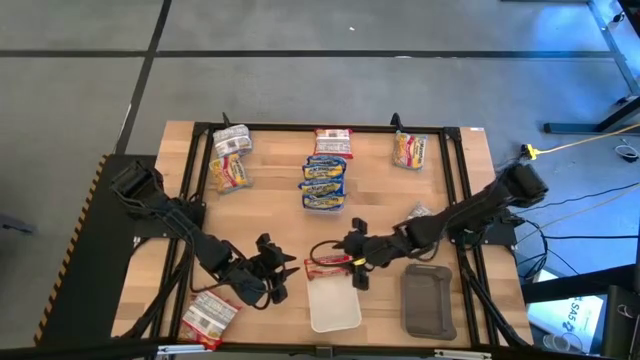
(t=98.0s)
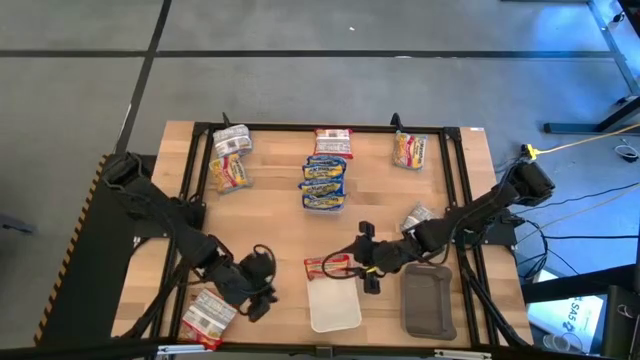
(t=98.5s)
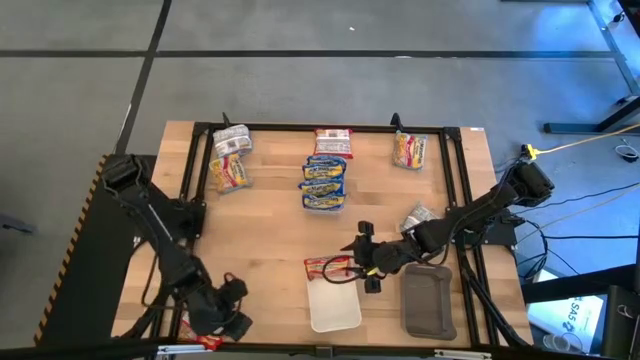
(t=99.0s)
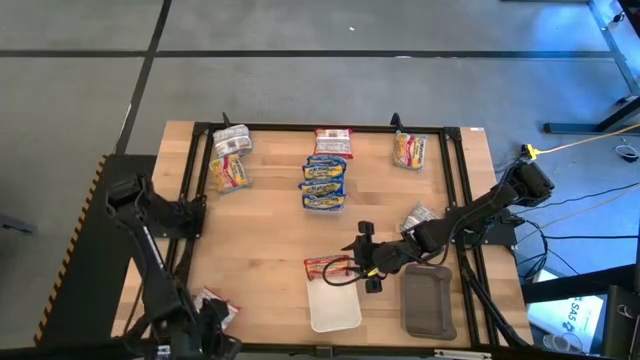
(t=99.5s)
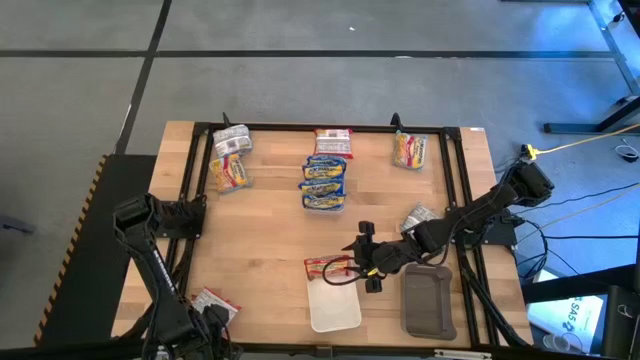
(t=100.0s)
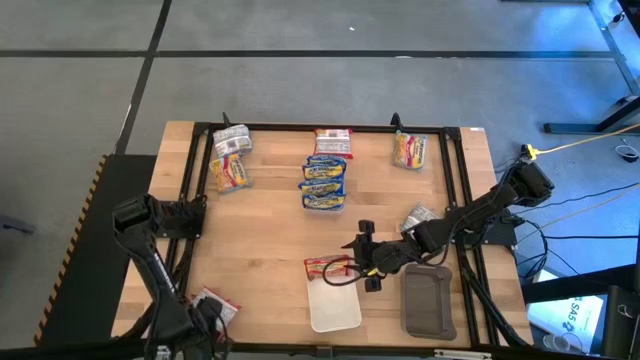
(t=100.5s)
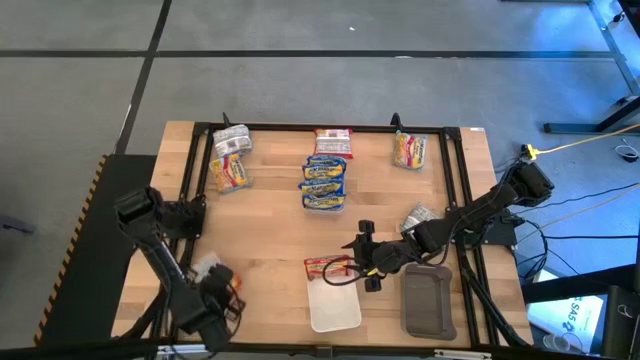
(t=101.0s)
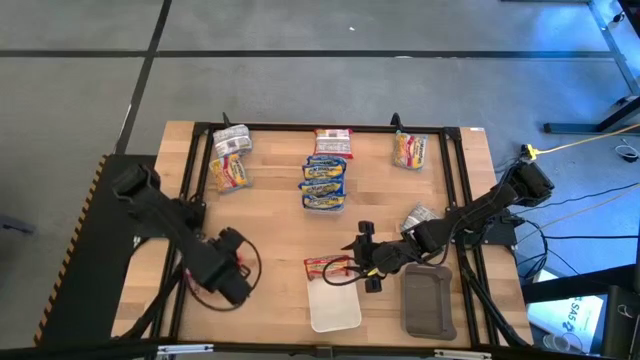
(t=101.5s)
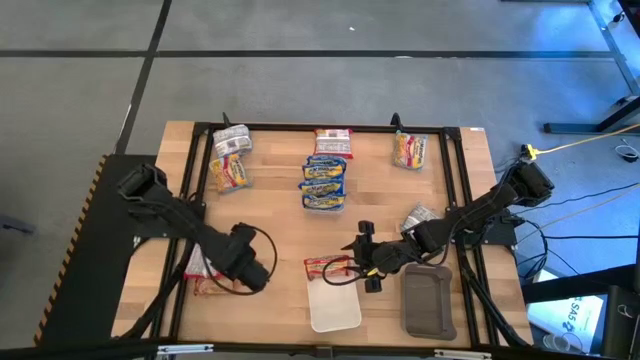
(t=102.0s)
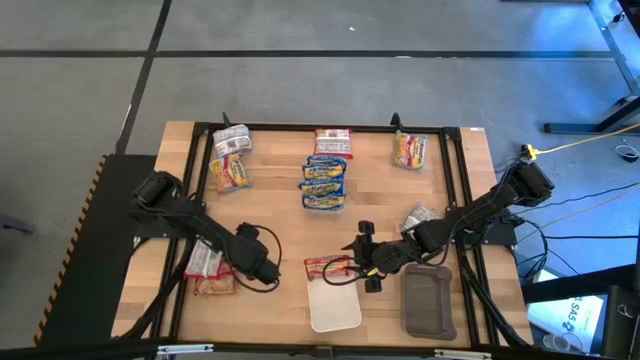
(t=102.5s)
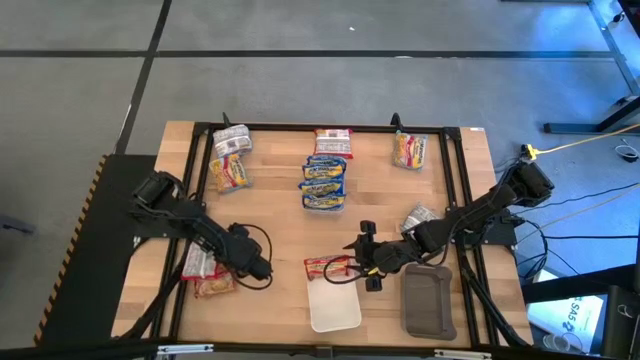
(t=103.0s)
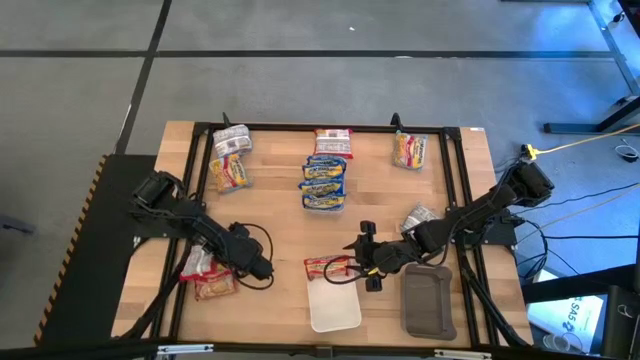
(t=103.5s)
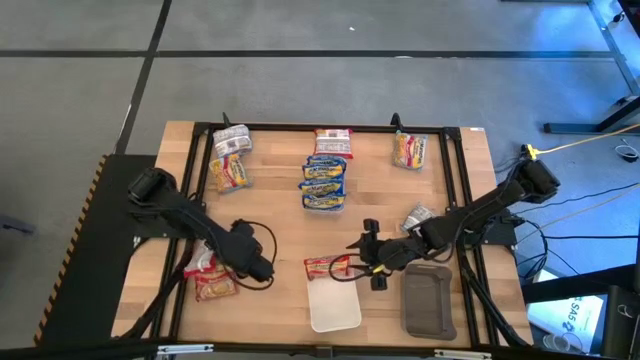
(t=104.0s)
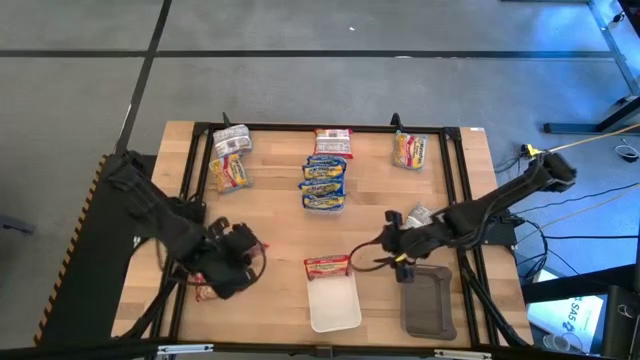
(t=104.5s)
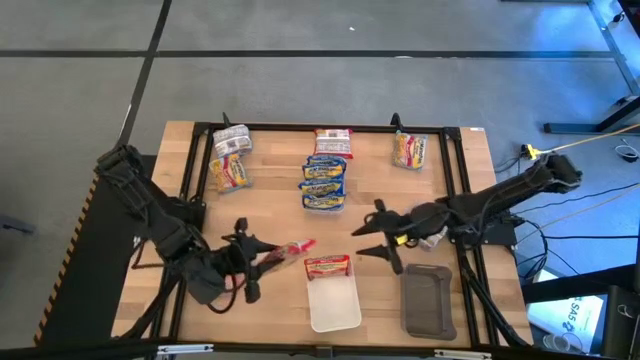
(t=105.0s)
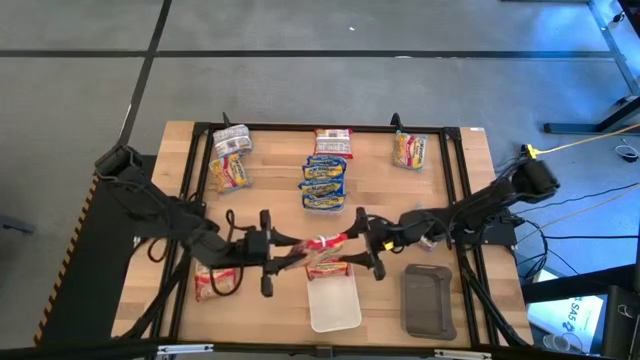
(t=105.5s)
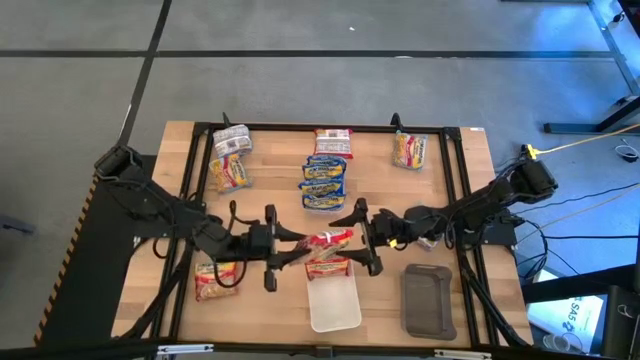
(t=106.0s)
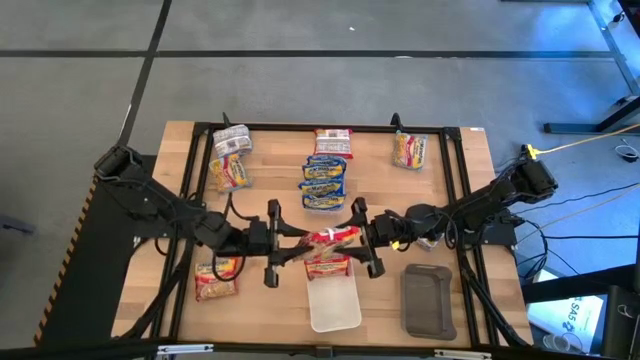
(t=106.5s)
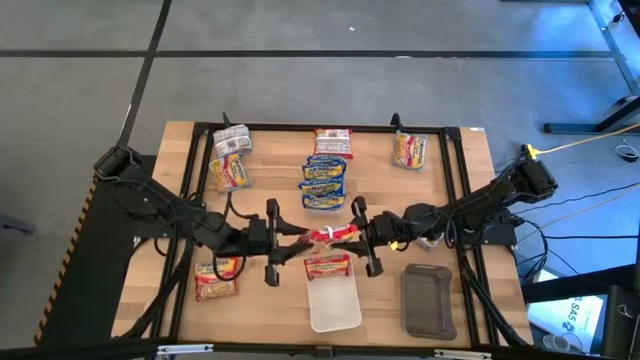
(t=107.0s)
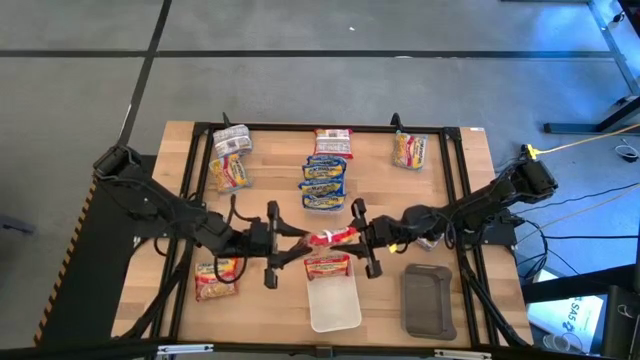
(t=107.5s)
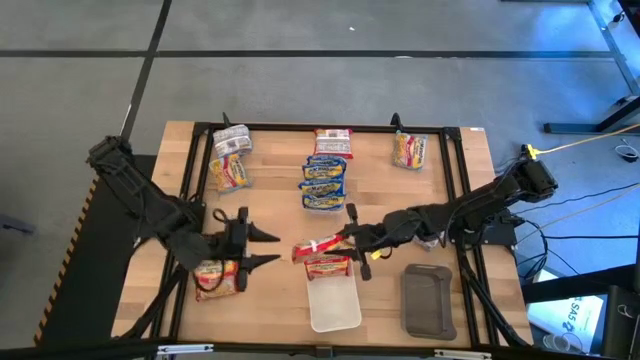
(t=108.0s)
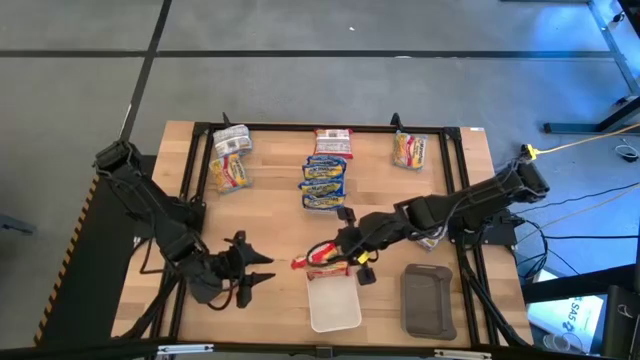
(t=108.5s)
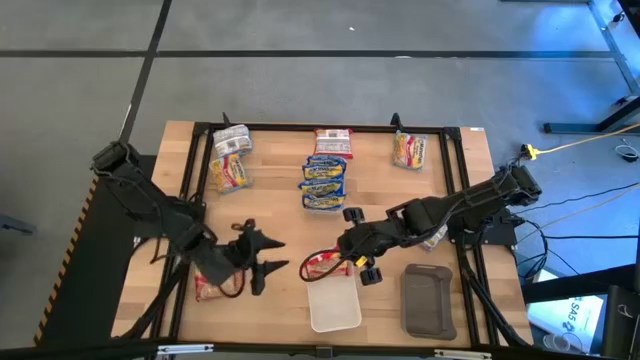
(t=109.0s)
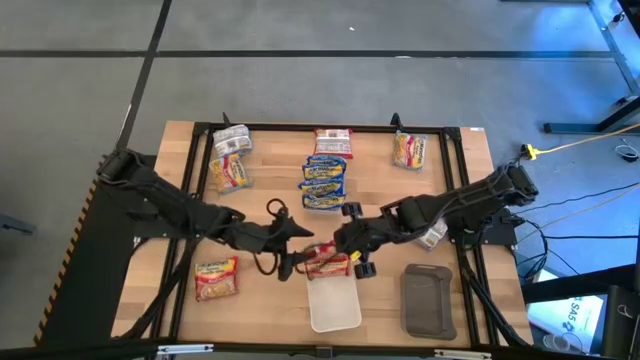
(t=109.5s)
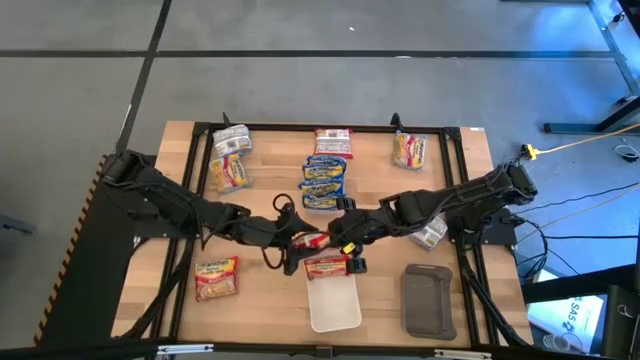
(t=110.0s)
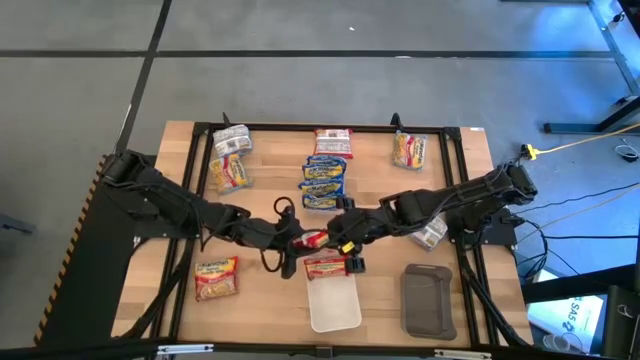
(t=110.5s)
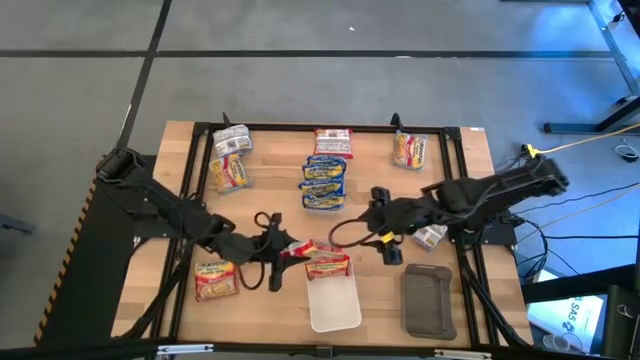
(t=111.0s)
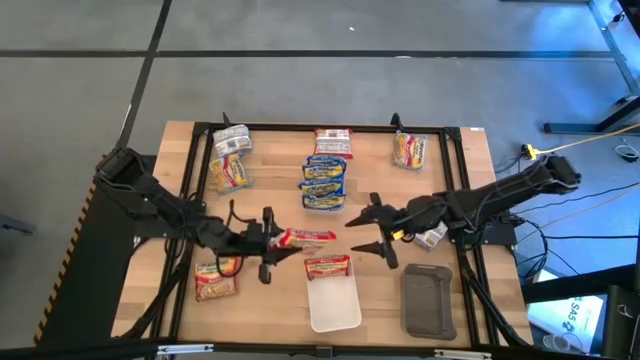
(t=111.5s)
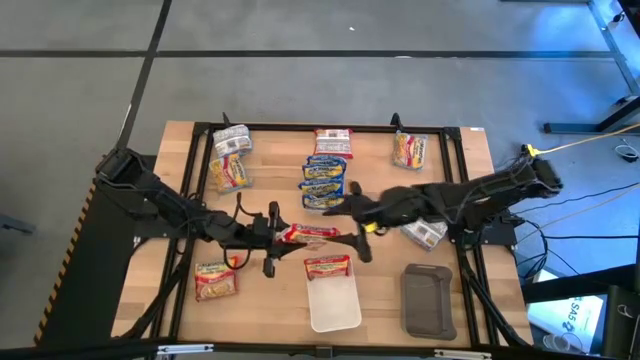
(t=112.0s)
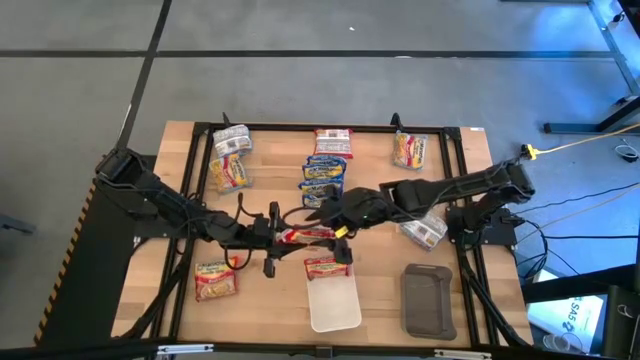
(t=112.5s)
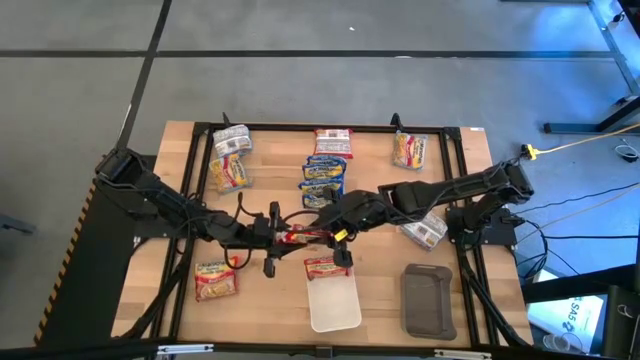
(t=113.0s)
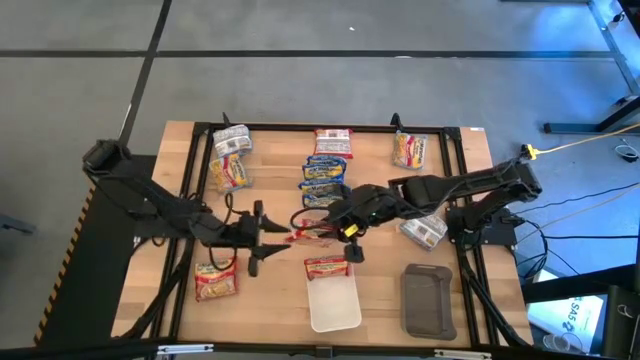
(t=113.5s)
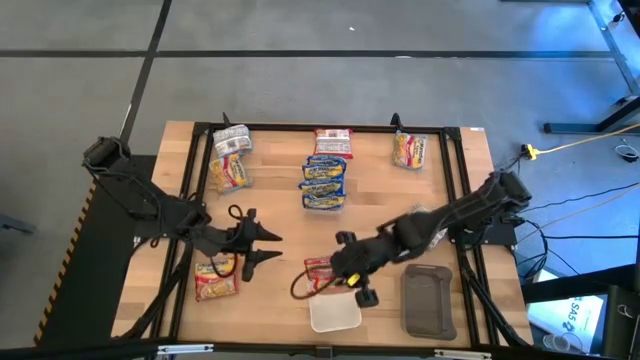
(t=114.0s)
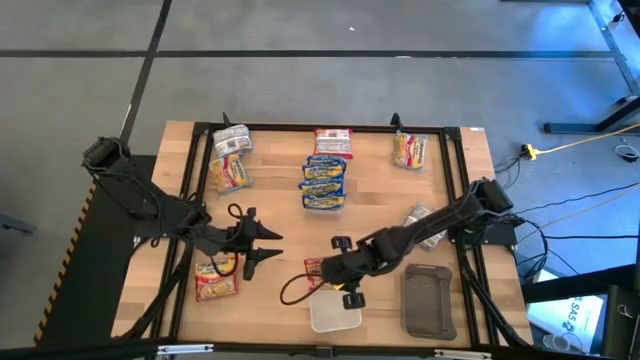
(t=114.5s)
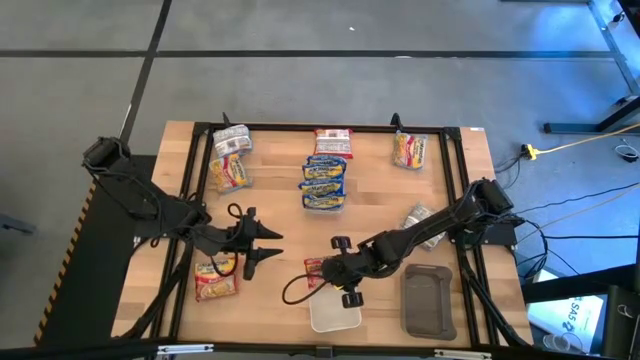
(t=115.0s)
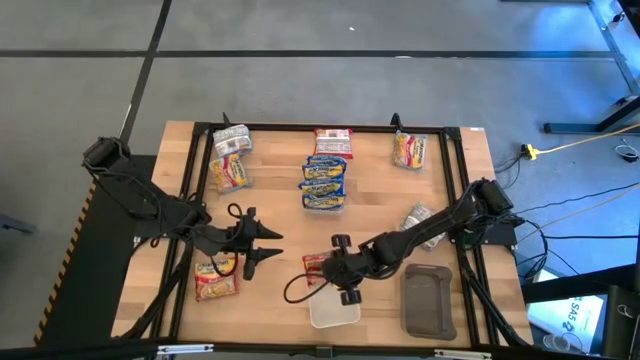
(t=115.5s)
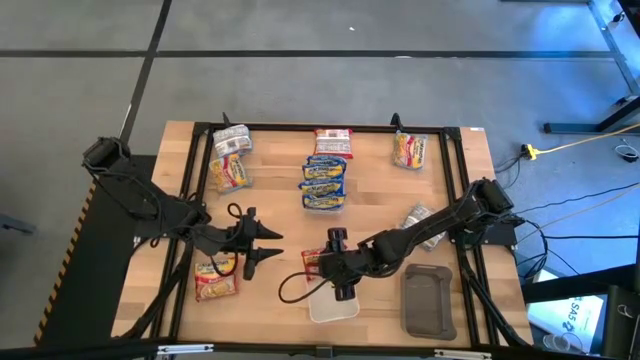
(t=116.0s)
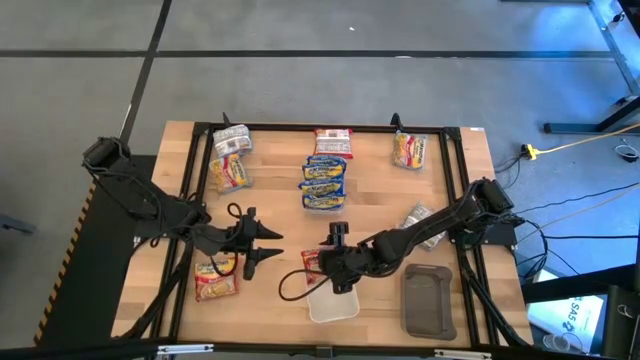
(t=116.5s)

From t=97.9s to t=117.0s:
Task: Sort Maruchan noodles
Put the red noodle pack into the white bin

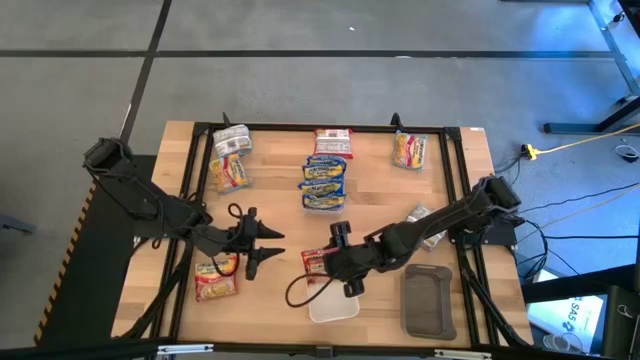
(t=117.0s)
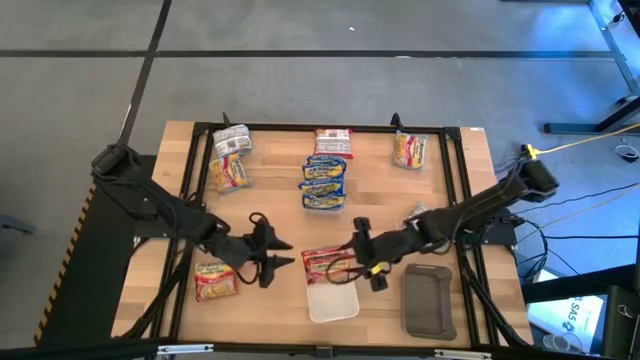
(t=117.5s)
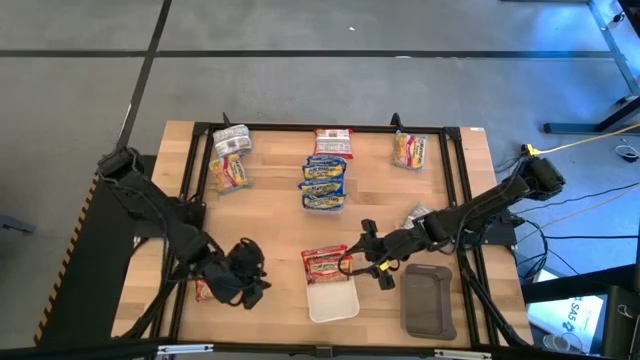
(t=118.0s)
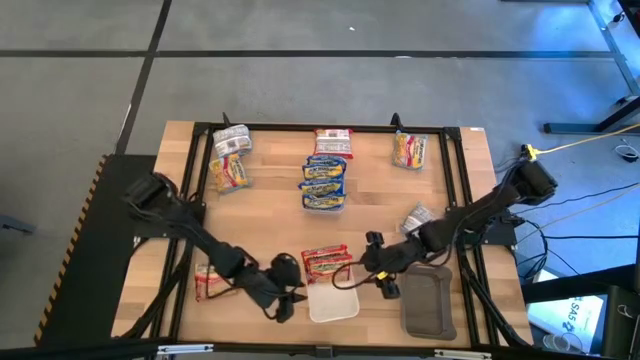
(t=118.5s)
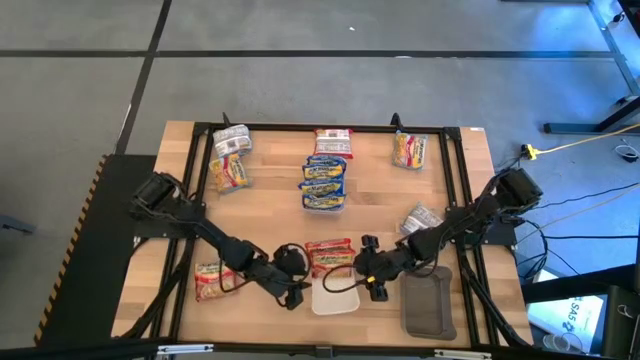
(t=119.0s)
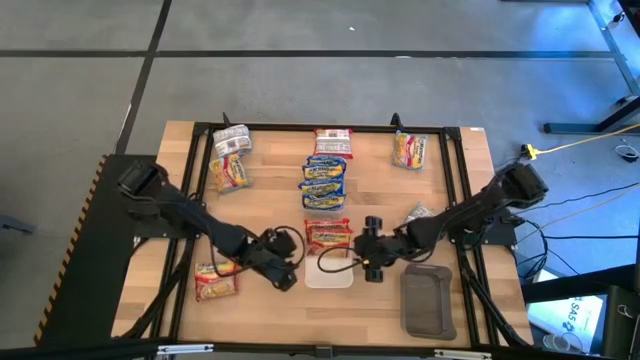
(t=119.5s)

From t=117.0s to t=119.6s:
Adjust the white bin
